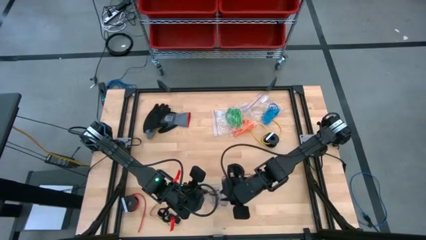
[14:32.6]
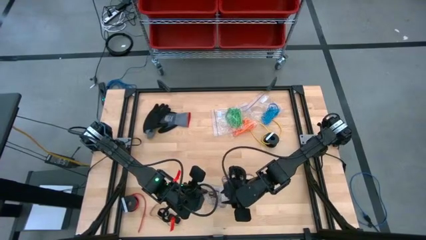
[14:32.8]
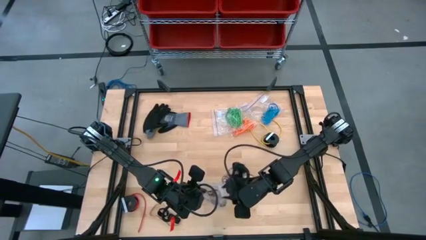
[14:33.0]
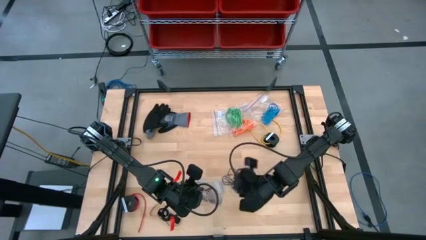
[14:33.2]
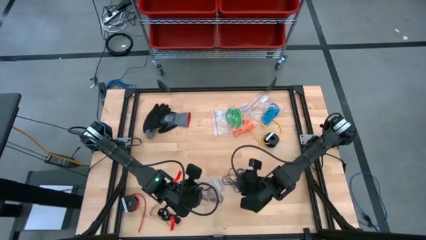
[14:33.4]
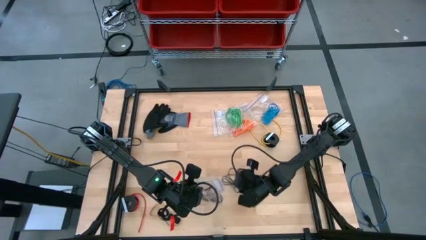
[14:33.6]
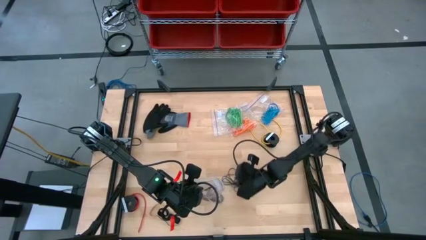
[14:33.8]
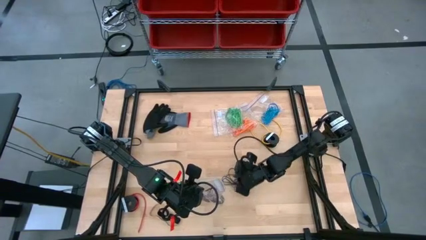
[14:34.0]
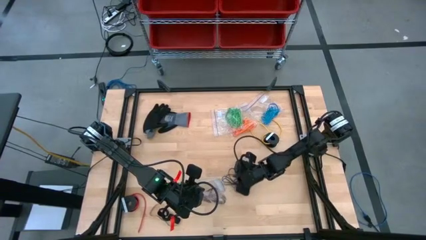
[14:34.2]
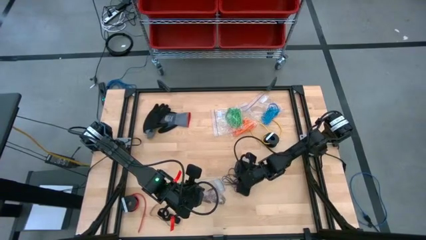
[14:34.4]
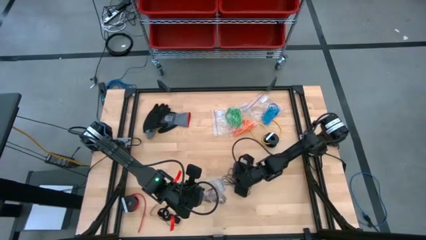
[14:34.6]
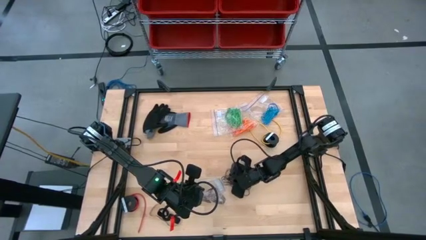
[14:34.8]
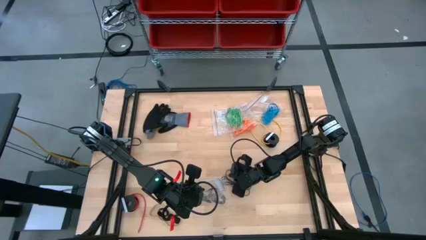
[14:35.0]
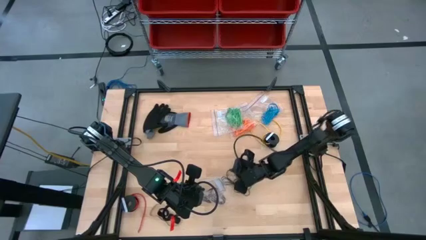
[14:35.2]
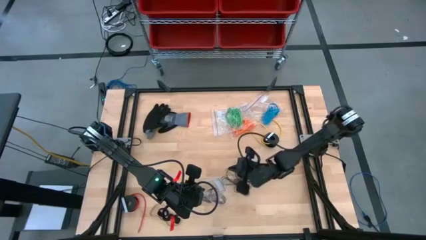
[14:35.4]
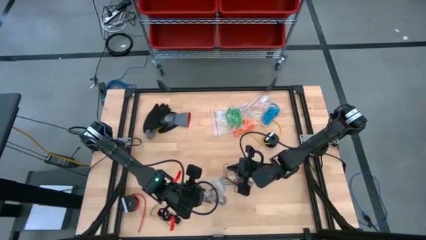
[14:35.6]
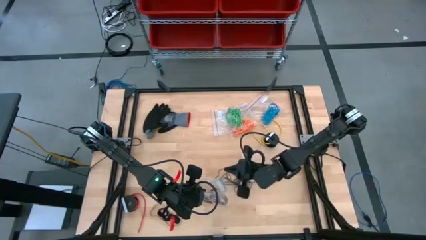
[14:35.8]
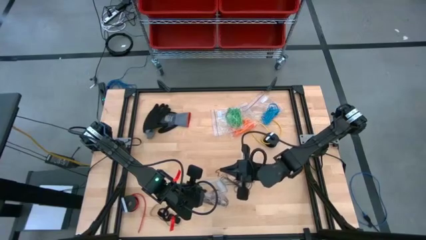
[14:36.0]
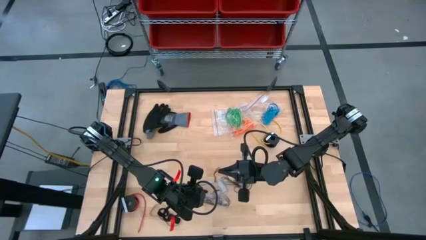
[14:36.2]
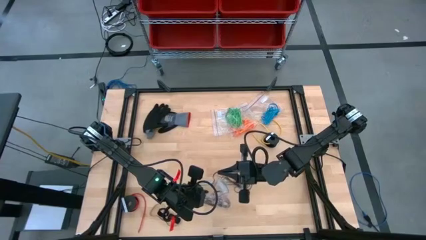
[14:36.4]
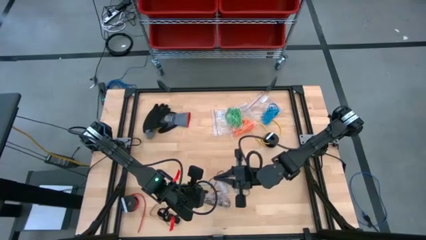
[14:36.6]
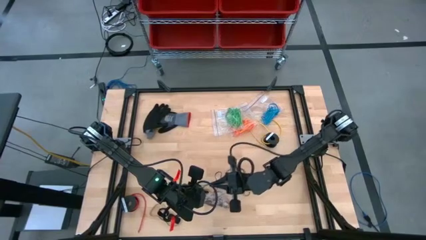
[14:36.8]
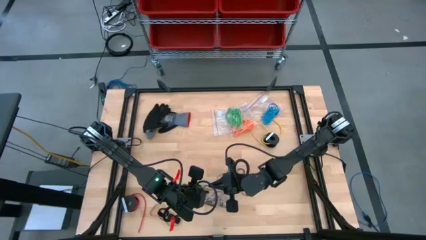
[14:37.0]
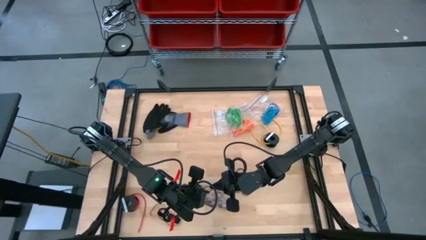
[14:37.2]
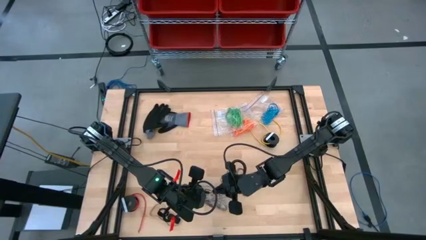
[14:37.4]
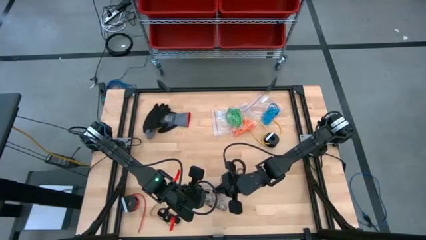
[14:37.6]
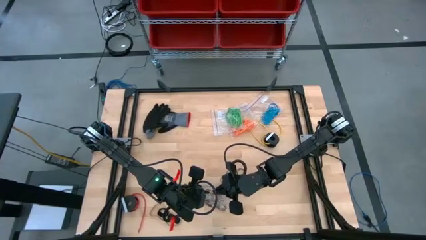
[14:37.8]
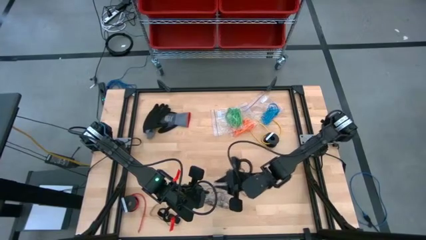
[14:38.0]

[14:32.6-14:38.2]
Task: Sort rubber bands
Put the black rubber band into the transparent zip bag

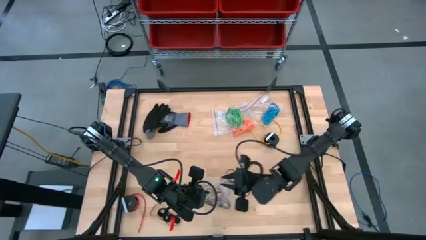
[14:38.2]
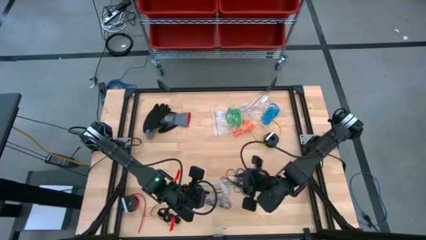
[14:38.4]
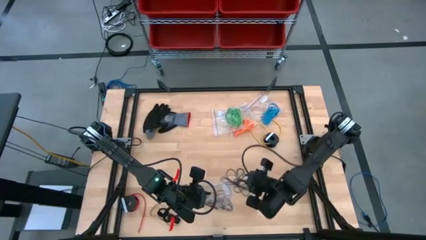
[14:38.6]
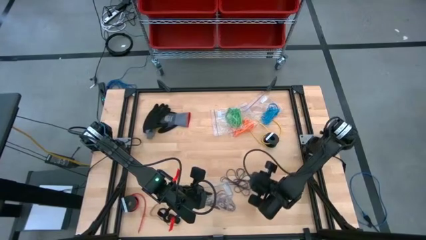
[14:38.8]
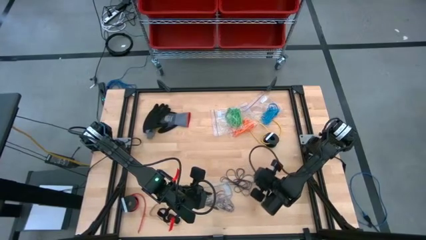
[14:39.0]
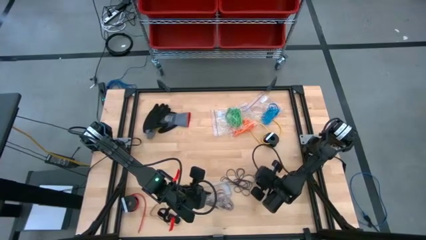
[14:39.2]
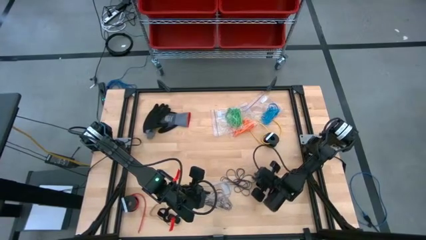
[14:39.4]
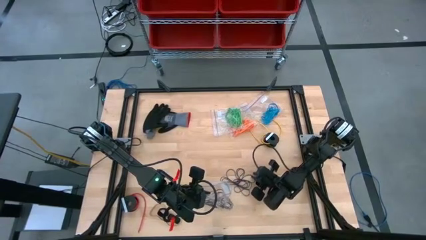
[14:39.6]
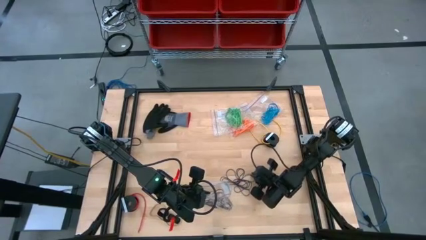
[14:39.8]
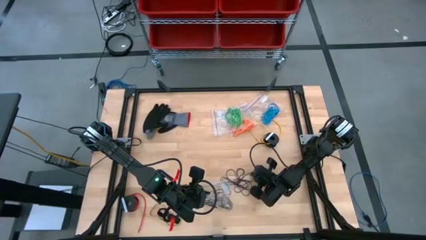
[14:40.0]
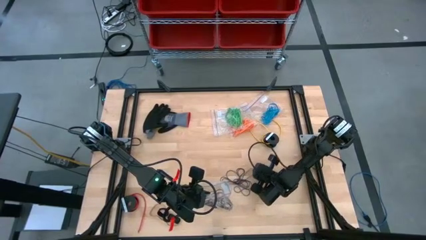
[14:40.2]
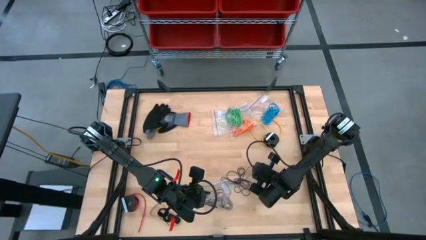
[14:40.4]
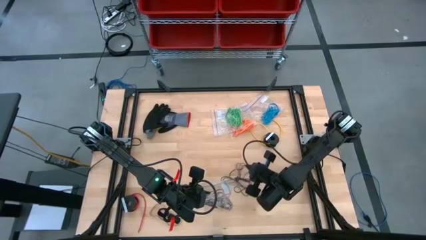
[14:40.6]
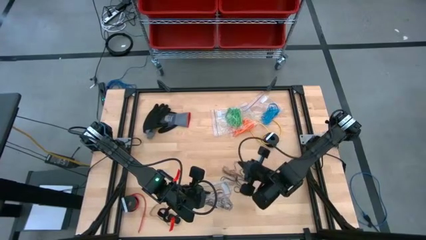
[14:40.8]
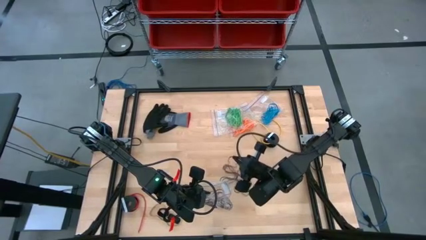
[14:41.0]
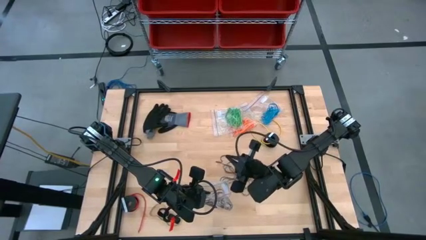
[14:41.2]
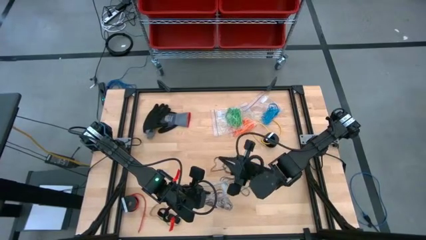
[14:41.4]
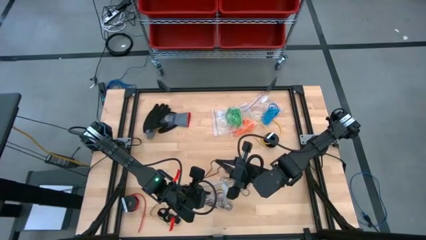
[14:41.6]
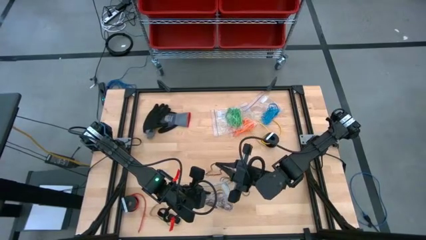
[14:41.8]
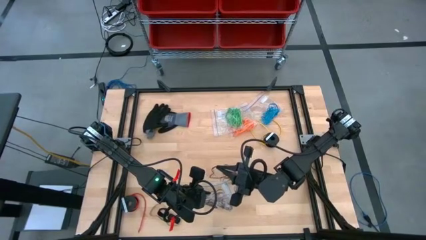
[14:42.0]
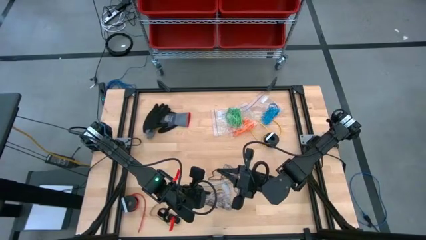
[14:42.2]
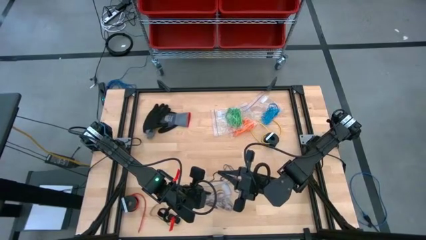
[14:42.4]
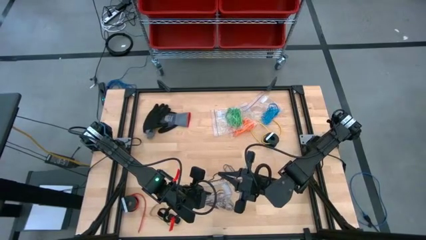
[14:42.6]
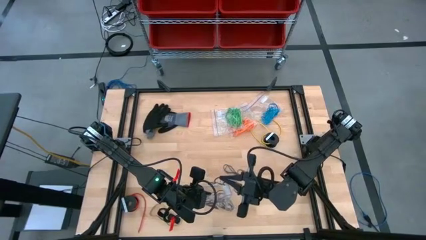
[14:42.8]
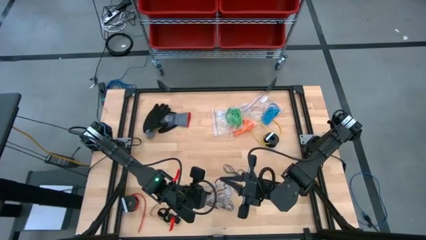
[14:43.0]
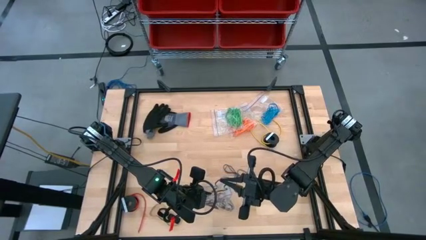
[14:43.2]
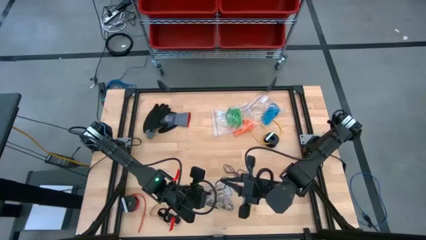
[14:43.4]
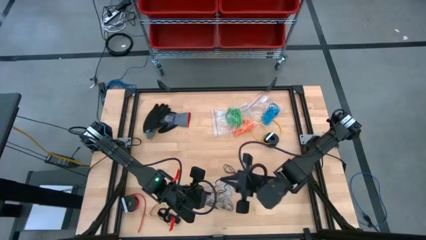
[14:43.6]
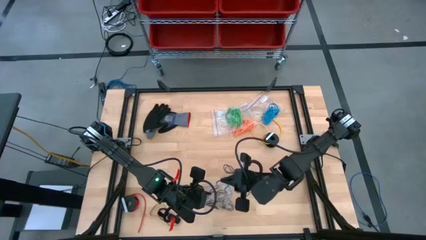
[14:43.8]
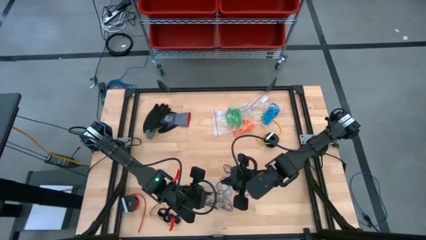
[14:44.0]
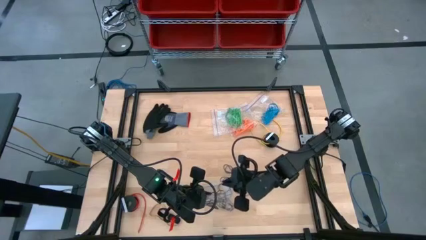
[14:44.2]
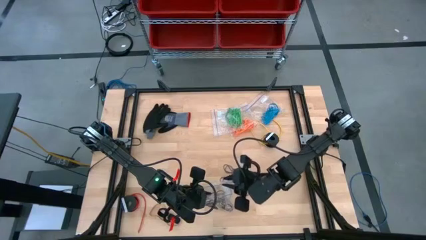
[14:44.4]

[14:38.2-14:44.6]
Put the black rubber band into the transparent zip bag

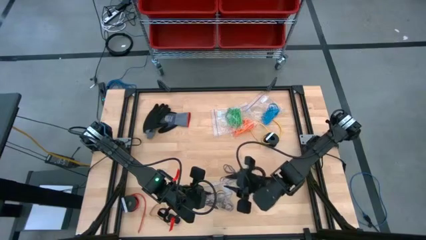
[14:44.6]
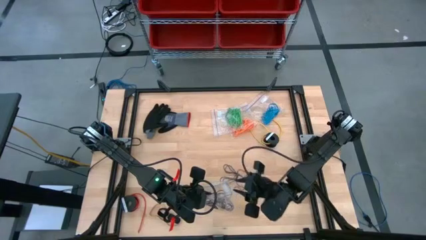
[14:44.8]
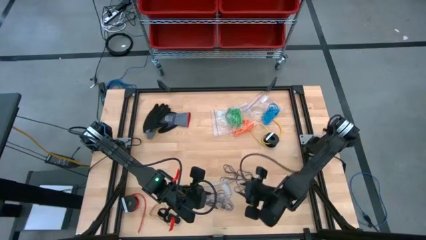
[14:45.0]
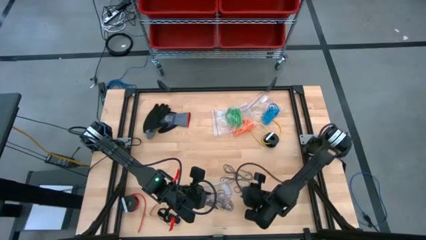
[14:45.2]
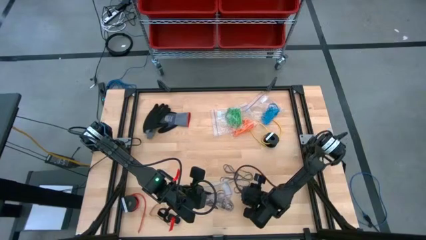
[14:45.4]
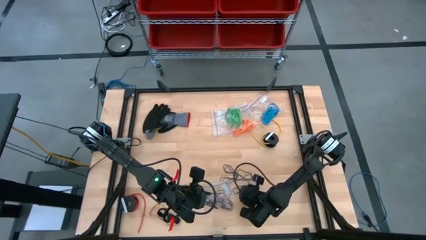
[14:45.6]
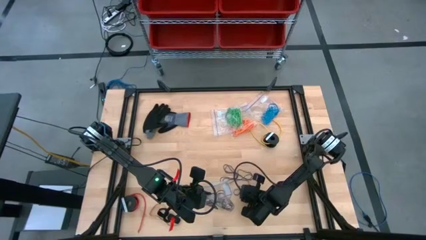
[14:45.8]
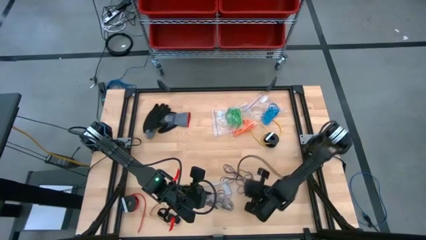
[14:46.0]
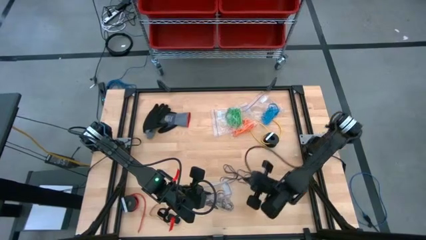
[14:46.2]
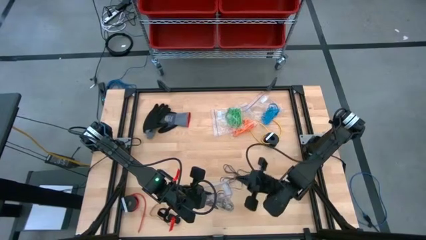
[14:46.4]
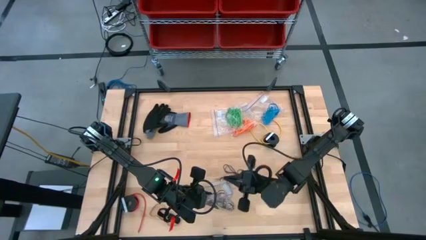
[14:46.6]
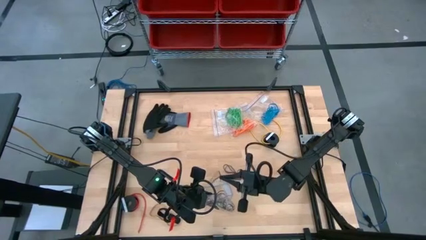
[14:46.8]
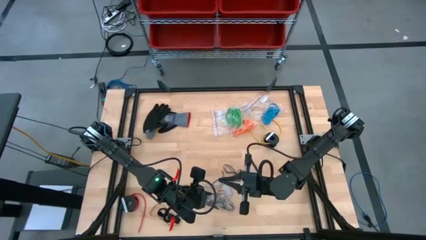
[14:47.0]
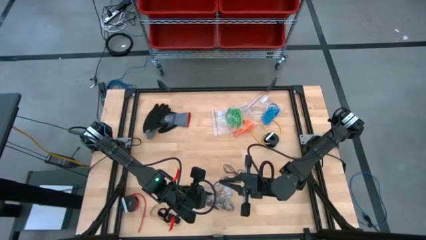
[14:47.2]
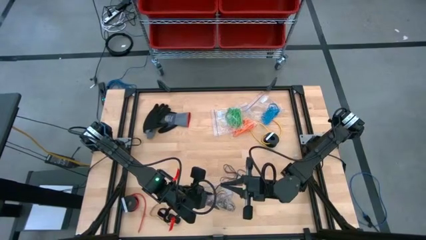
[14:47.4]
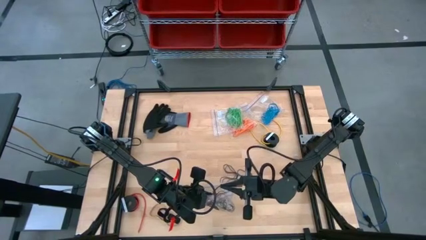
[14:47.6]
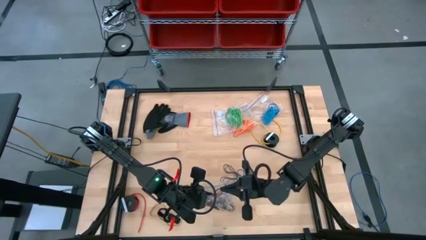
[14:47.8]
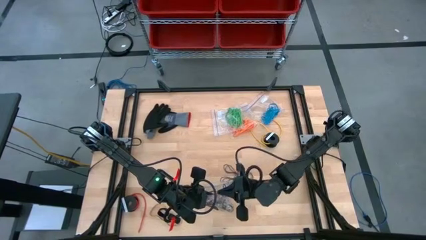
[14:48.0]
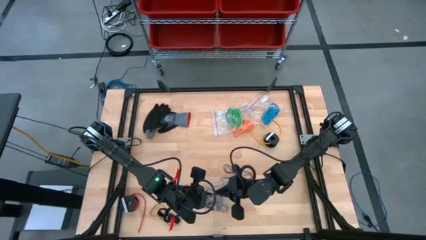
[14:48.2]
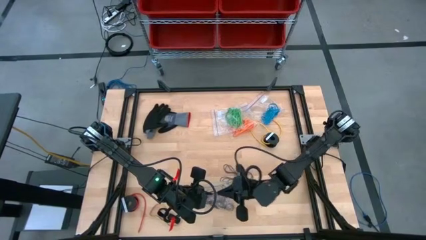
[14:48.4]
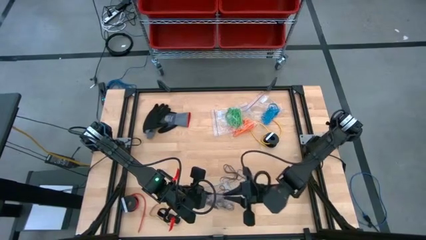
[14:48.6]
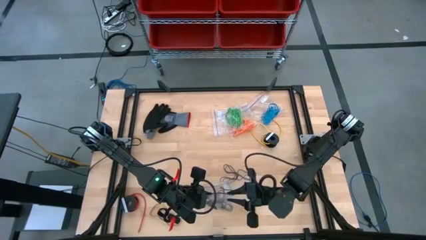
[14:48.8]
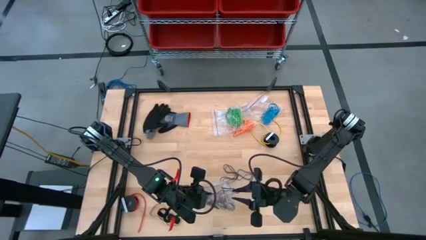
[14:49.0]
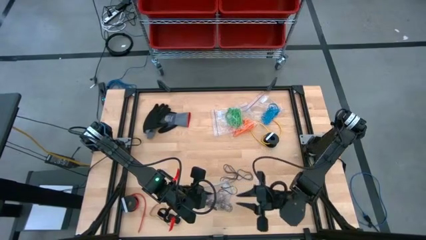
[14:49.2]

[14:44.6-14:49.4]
Put the black rubber band into the transparent zip bag
